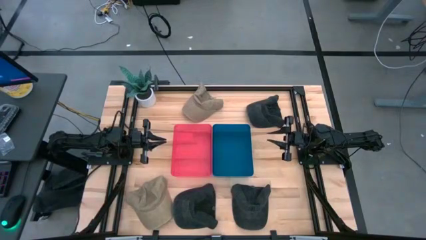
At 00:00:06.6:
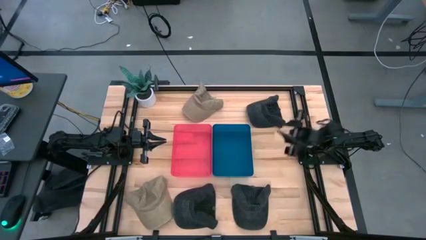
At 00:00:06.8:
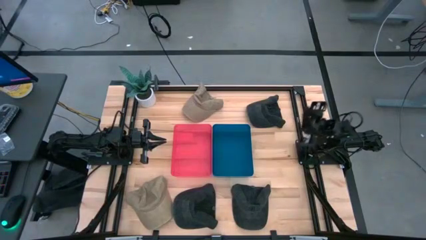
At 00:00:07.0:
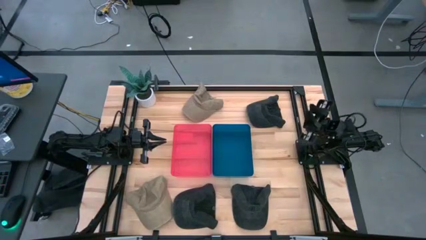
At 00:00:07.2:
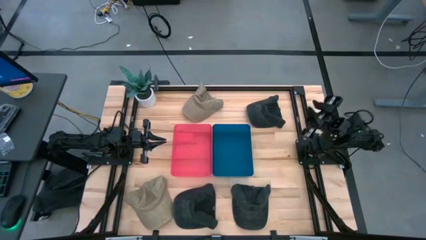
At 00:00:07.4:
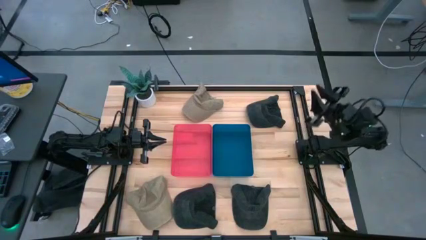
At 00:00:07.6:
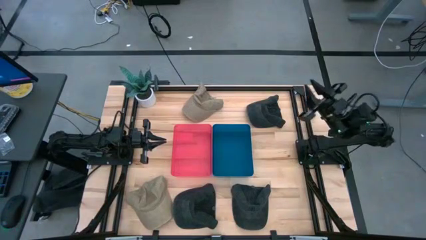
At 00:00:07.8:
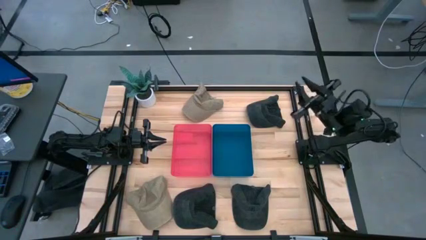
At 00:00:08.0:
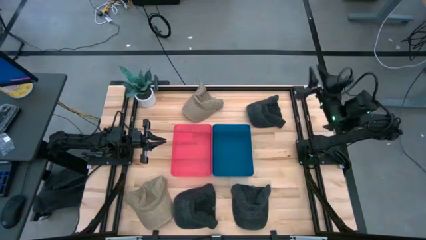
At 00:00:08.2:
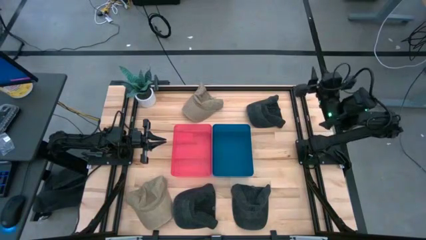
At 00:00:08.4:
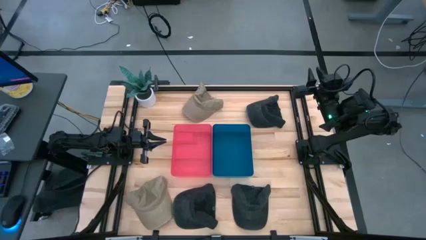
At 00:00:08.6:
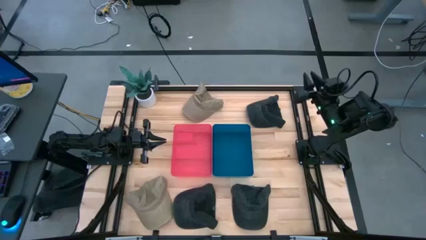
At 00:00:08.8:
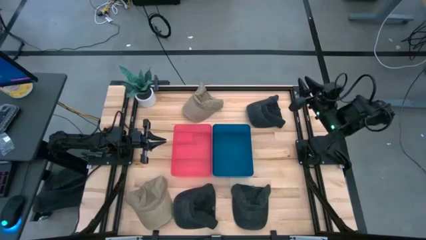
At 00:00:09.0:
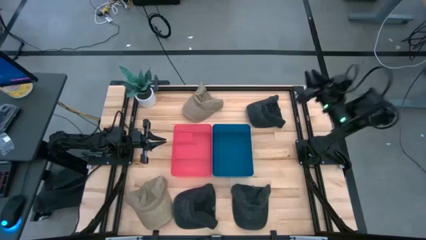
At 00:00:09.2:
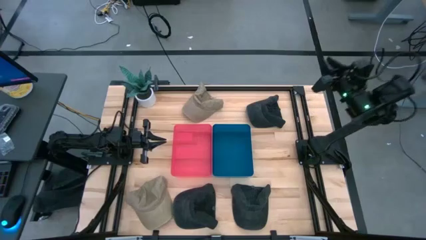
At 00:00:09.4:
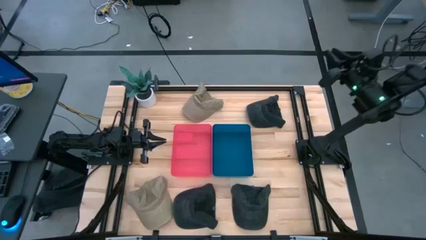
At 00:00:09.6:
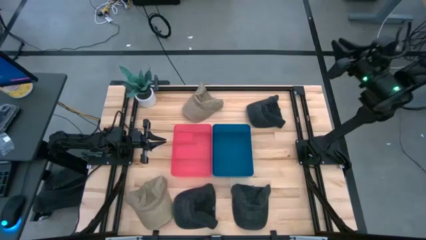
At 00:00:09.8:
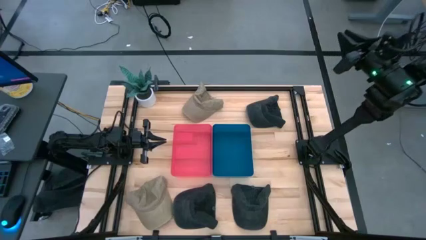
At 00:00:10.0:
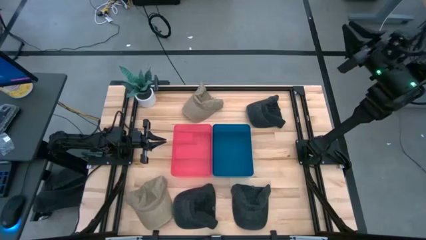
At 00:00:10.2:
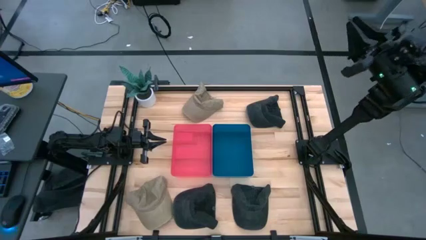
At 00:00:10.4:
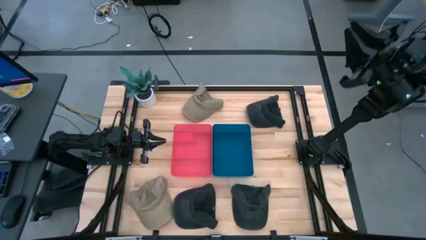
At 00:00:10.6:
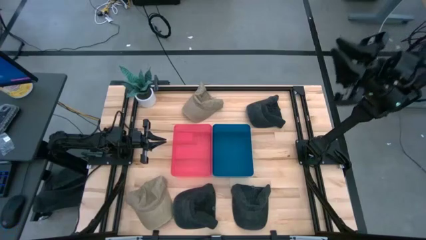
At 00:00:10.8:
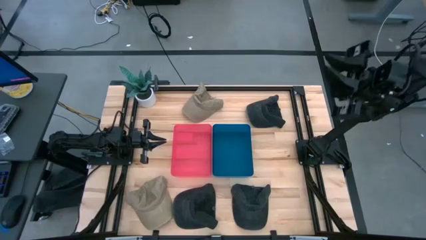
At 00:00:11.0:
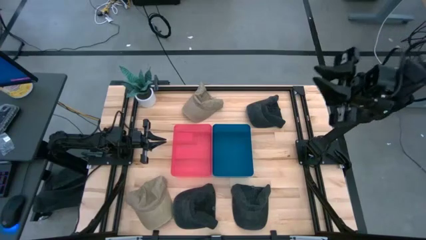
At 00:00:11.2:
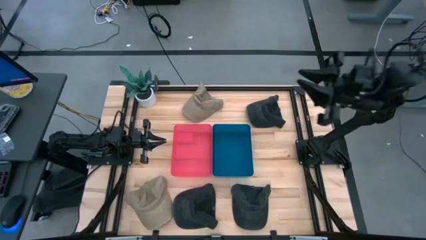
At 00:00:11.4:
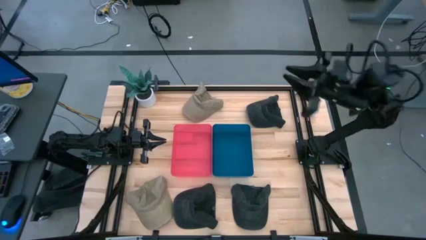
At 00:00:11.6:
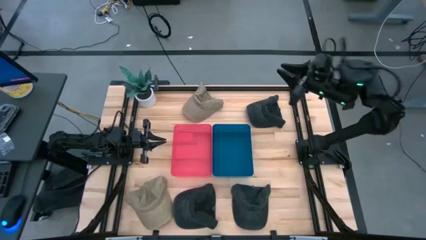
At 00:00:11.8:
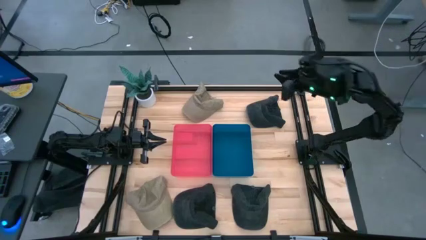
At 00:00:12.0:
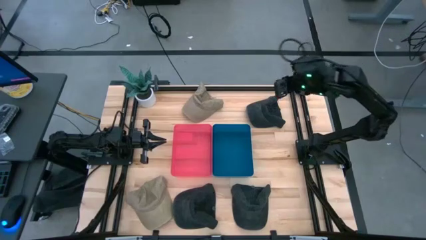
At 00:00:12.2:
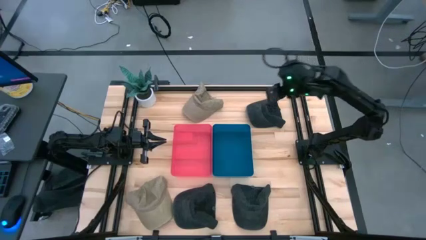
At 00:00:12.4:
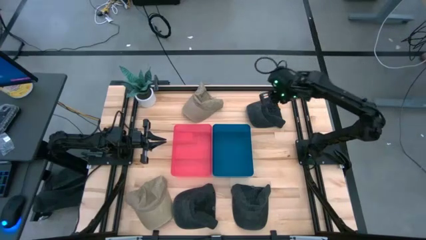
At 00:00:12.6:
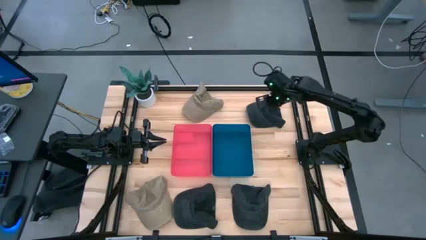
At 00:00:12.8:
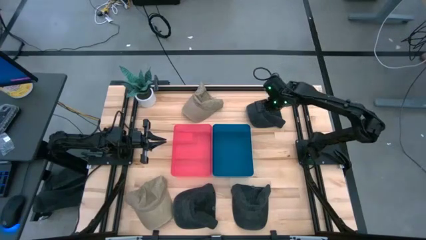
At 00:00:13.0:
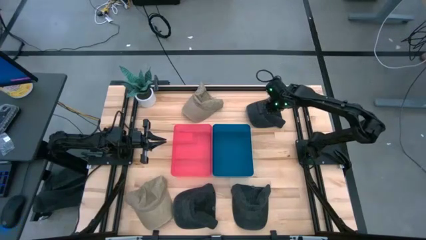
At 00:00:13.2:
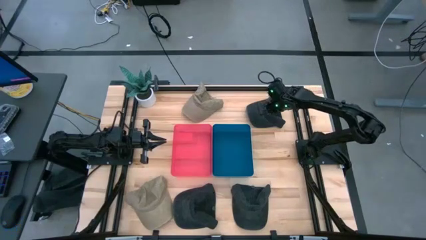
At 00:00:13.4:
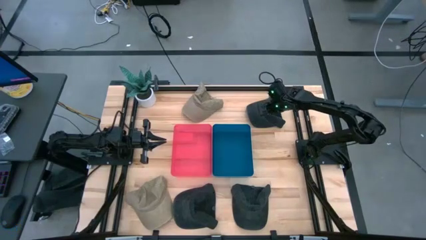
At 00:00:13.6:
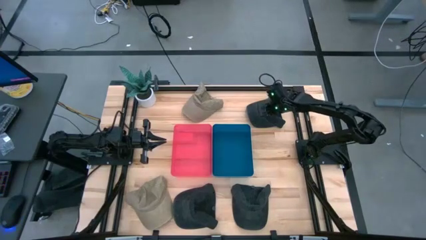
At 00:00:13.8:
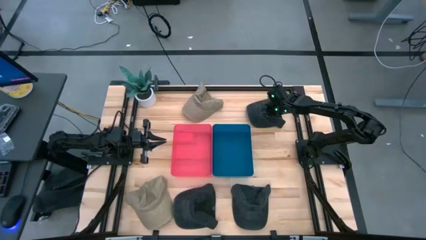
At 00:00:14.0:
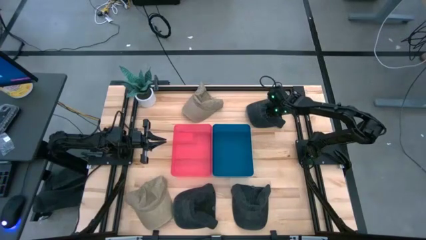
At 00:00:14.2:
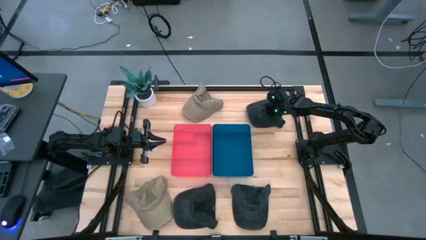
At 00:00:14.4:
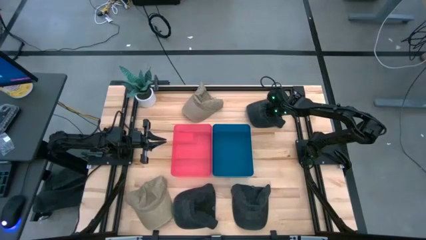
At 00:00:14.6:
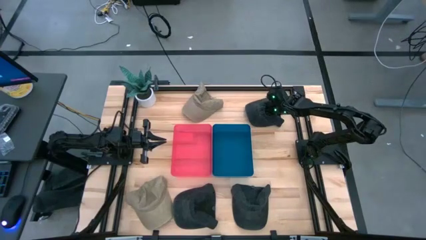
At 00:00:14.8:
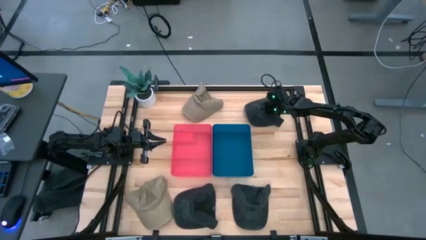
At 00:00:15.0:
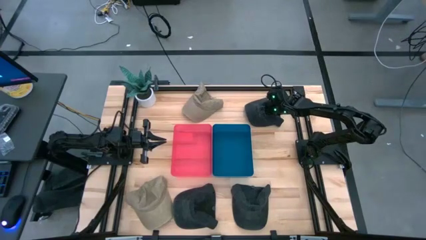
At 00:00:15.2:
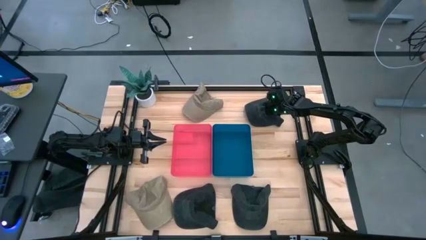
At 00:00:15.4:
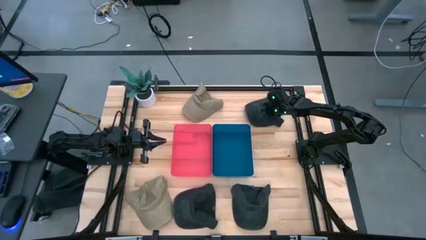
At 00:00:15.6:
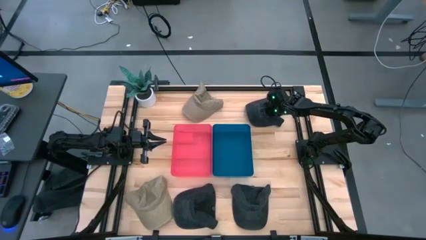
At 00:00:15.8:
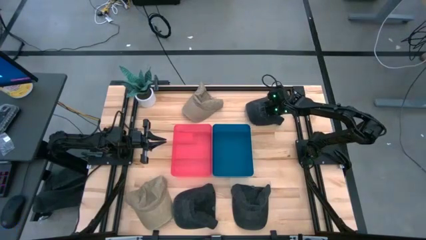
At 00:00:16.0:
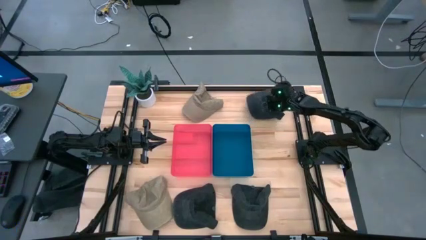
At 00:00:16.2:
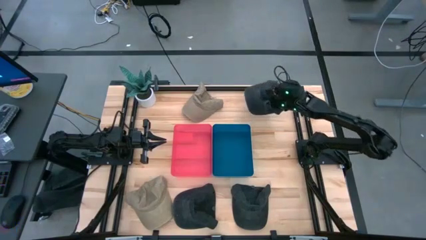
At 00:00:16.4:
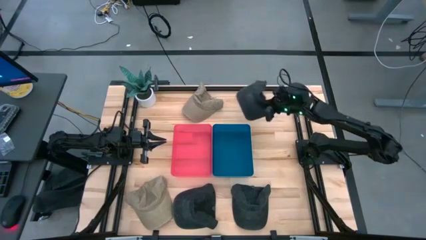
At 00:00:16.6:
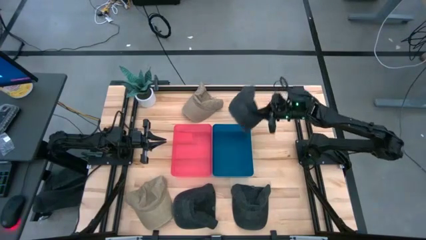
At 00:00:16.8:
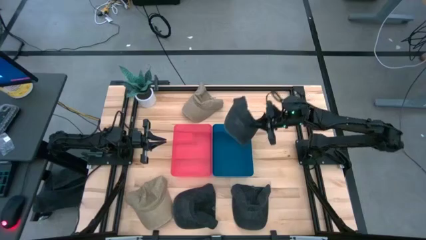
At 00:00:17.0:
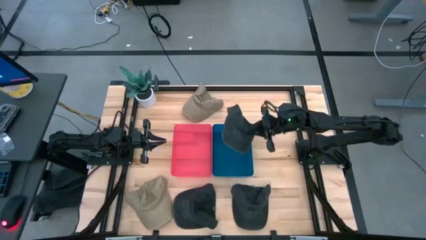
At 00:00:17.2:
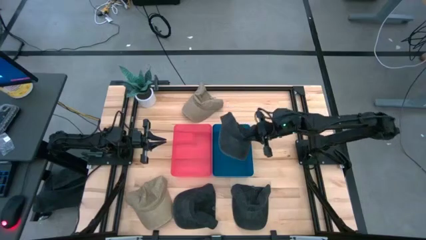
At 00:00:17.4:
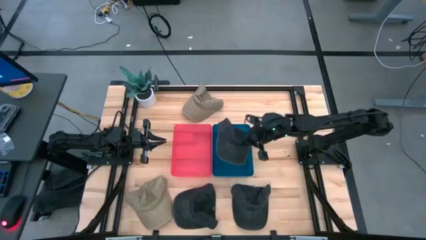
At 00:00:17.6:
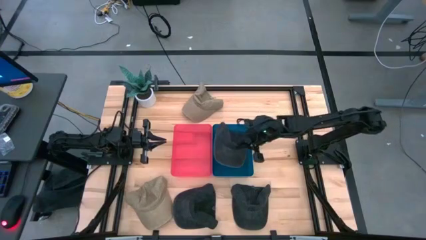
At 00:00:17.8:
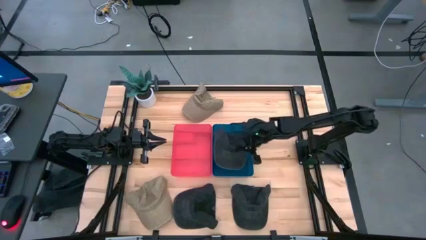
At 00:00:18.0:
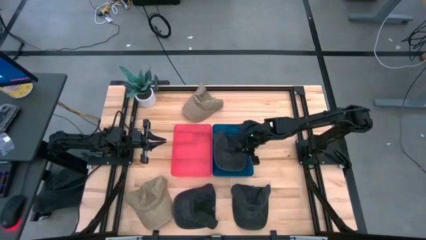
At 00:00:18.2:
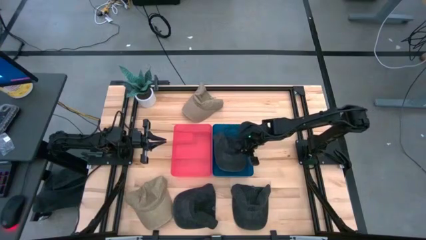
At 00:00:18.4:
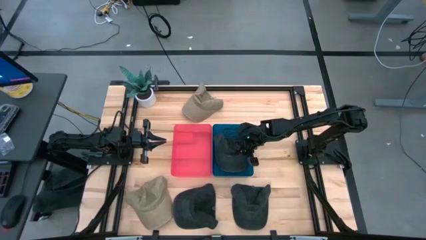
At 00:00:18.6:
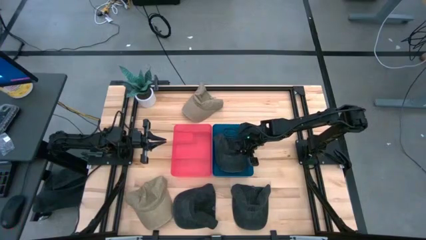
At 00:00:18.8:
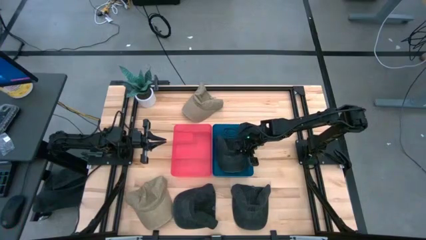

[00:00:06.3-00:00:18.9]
Task: Pick & Place hat
Put the top right gray cap into the blue bin
